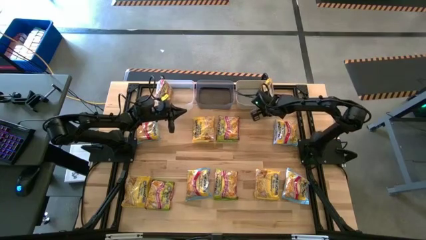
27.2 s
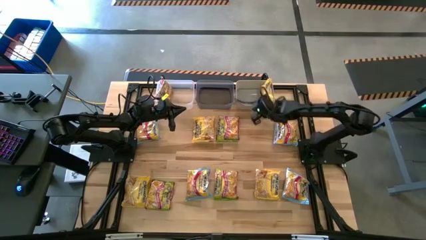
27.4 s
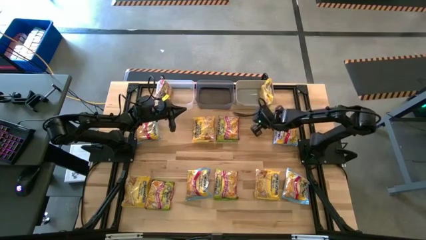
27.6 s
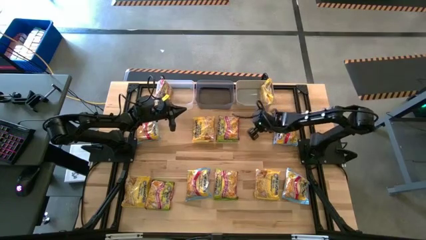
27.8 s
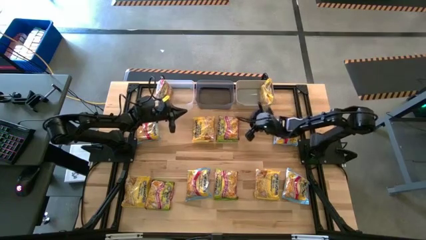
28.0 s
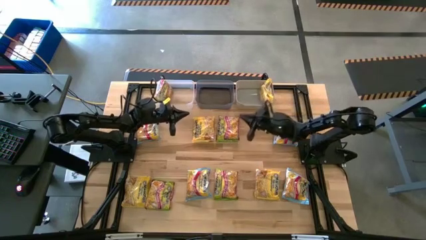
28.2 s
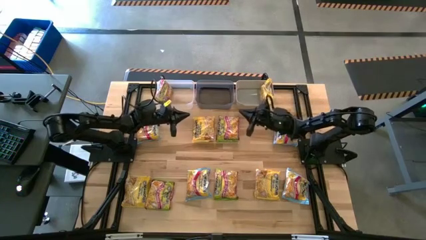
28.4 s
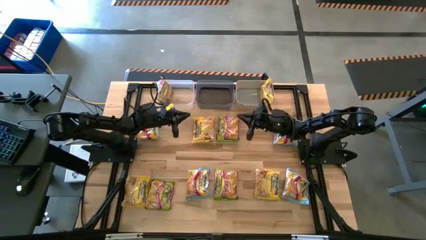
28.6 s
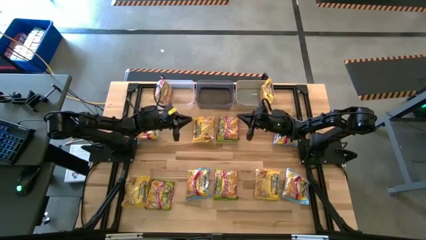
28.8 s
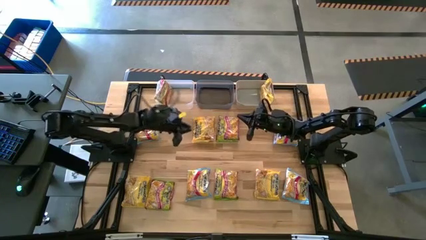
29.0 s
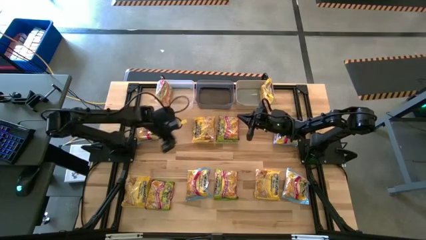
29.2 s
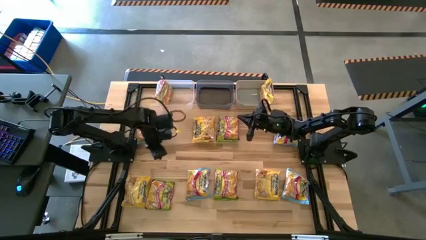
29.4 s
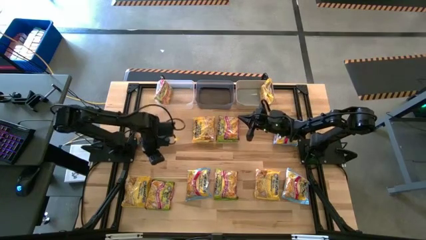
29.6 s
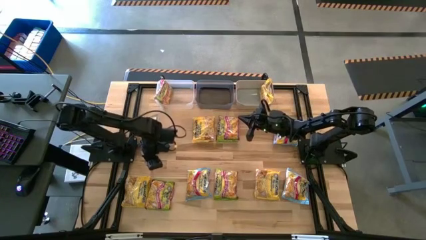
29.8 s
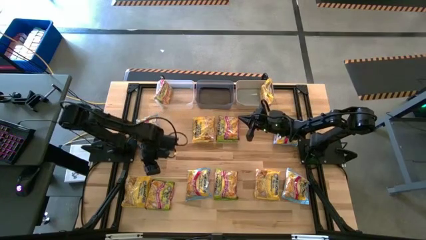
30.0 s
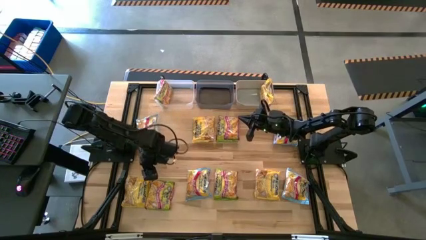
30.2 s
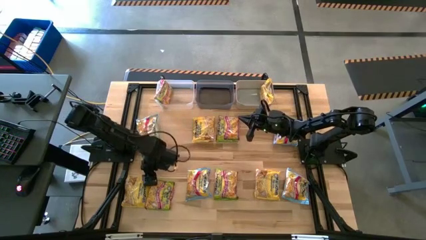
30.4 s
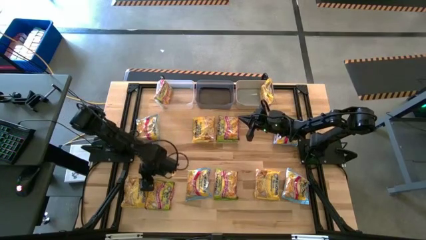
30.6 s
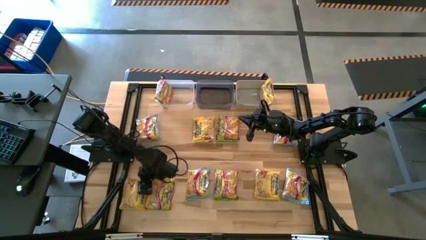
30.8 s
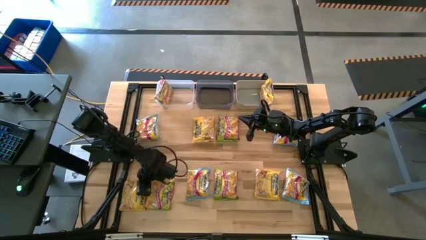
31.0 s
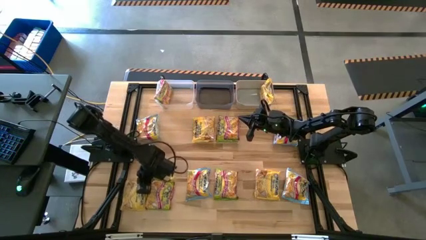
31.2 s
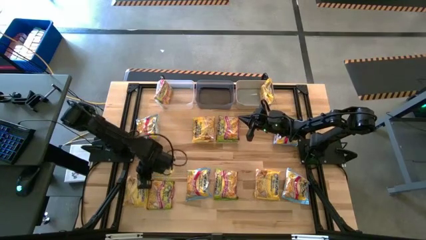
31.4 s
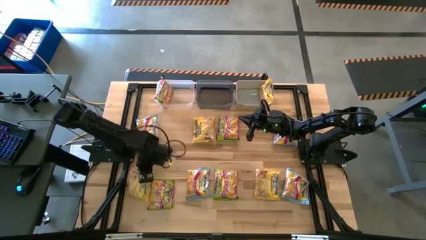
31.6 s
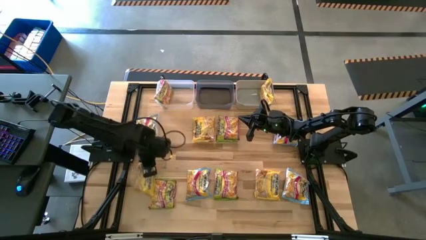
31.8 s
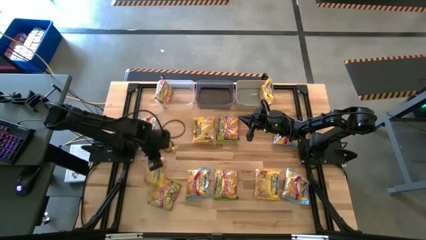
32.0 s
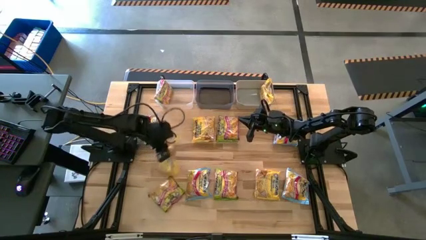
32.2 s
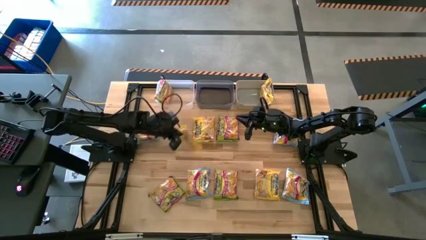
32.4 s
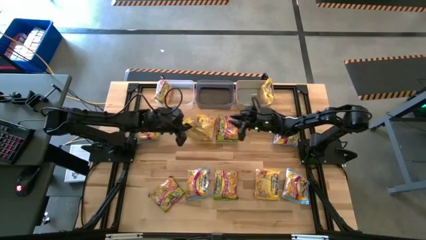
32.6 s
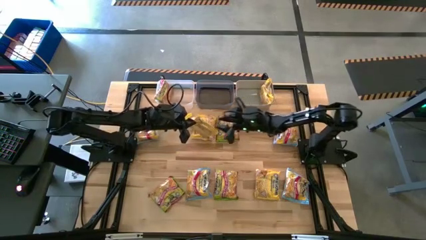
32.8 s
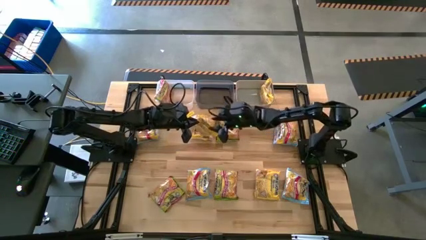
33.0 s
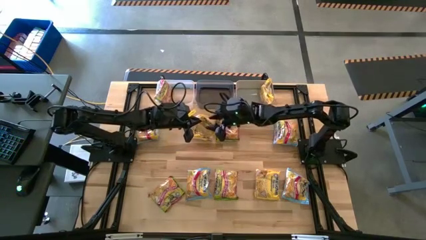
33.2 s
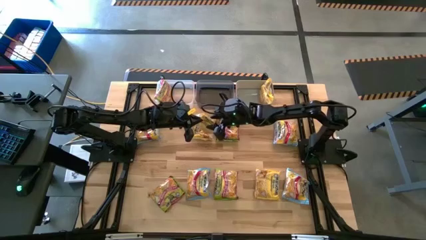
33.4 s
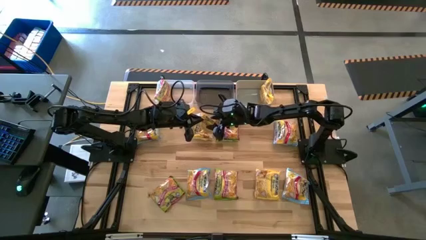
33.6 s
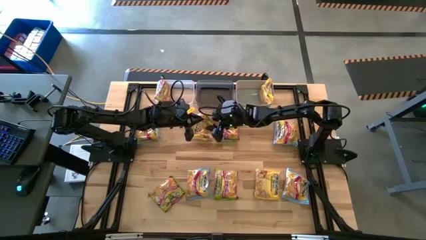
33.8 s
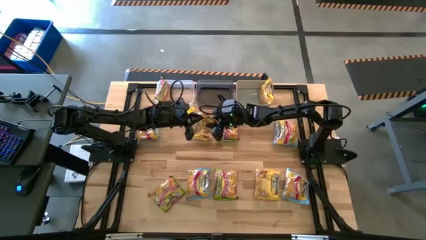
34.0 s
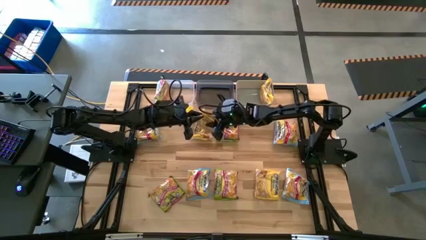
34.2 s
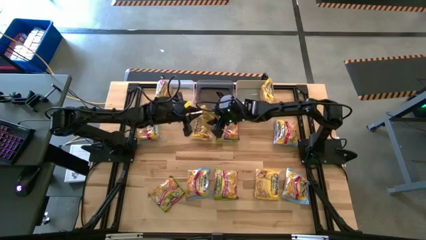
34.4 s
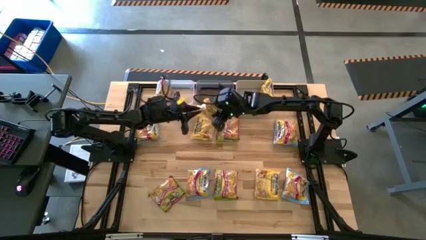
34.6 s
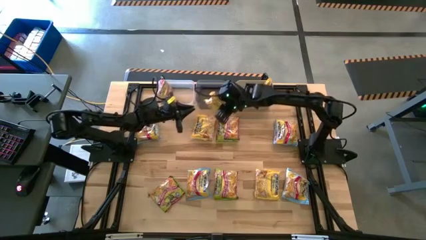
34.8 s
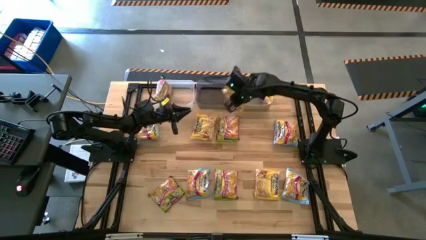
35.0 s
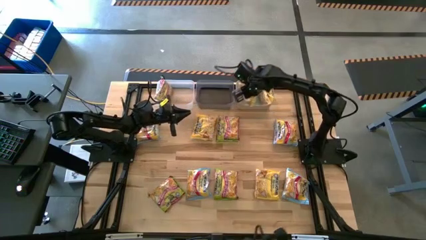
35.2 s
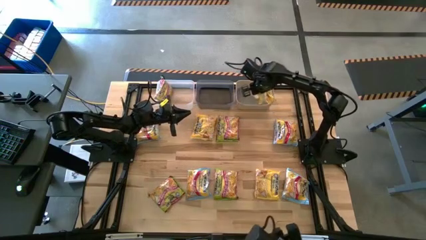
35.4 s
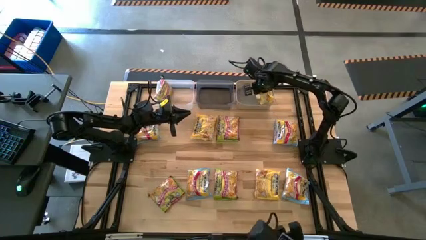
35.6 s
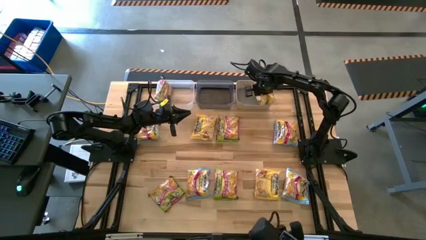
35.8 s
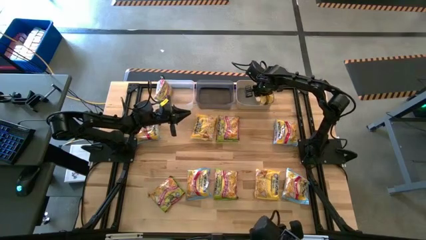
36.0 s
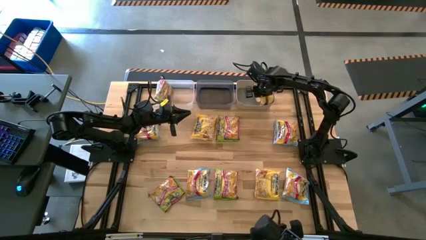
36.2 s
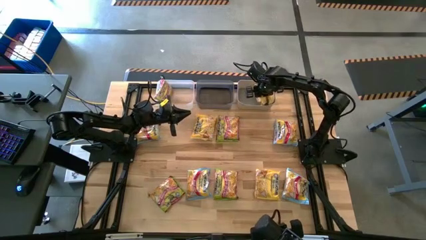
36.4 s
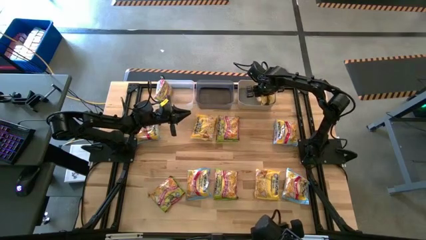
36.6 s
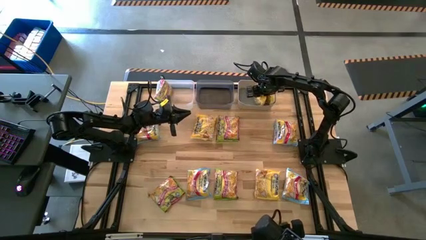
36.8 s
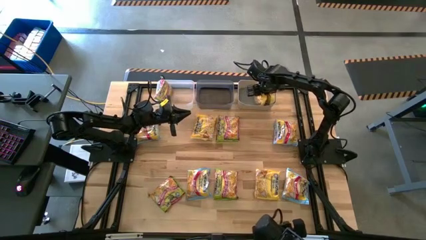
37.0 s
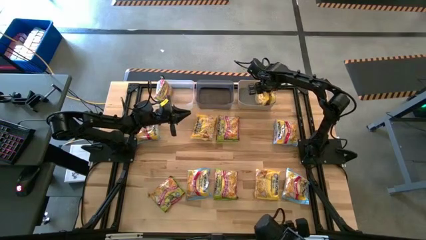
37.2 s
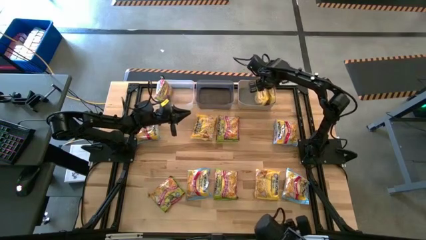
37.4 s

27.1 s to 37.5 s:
Task: Sort Maruchan noodles
Put the bottom left yellow noodle pack into the gray bin

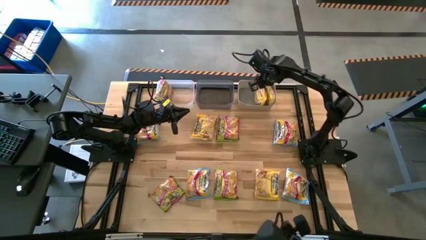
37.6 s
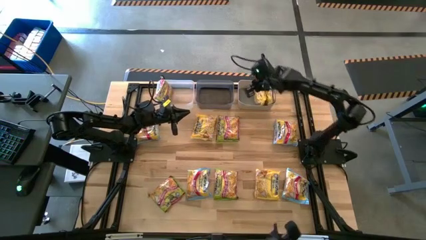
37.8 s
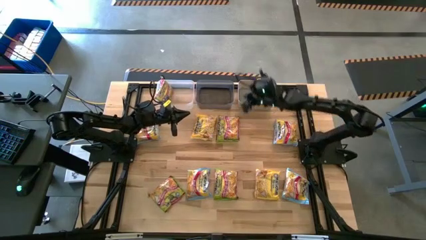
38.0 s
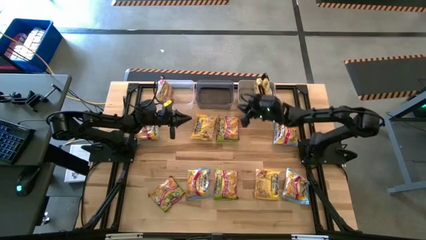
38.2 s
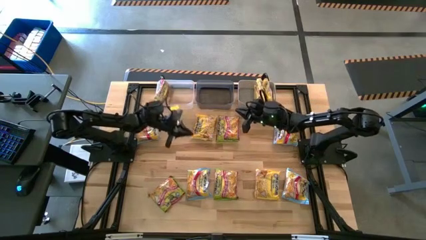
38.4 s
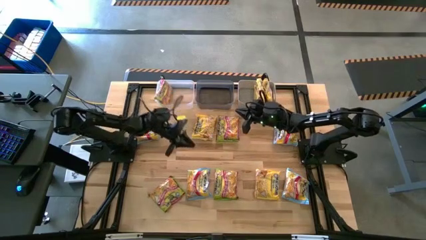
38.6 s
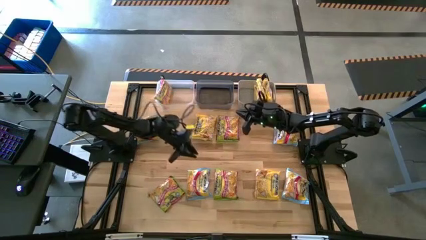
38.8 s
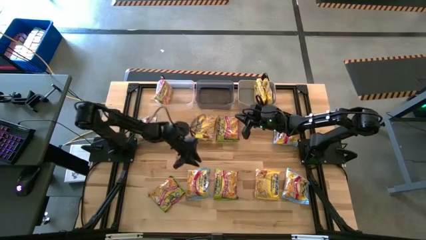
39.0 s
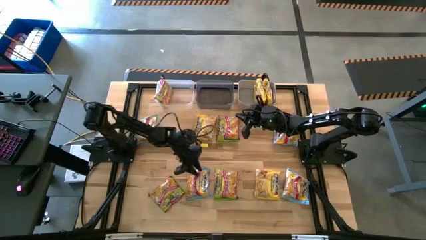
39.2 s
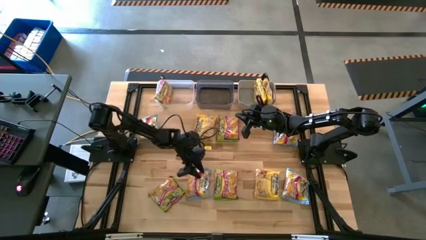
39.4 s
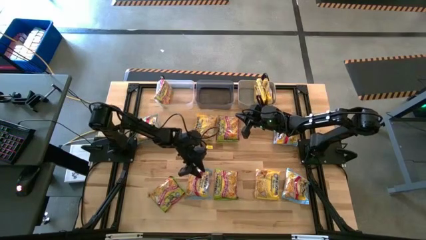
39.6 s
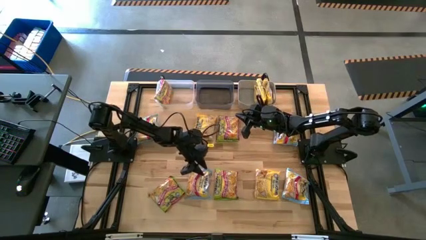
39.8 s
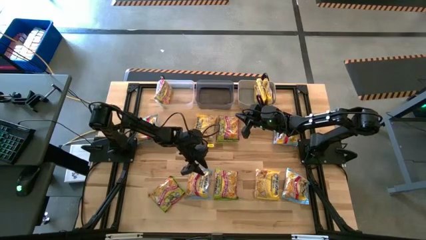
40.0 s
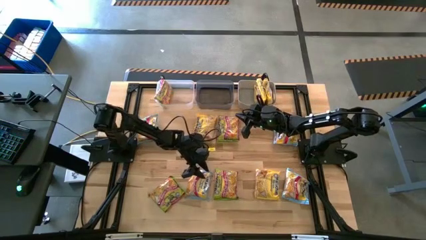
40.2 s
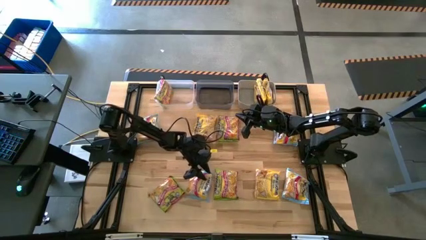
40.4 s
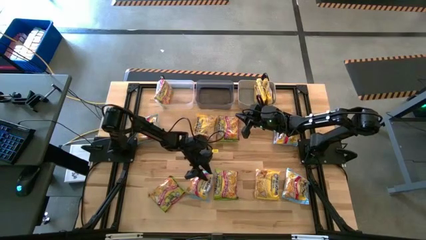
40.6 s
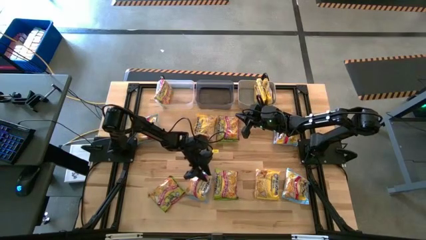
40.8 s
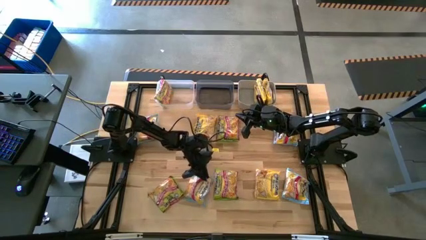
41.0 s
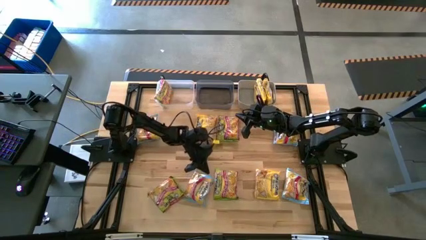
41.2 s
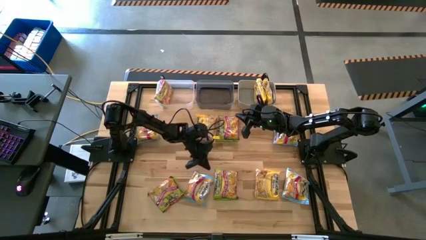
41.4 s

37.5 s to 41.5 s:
Put the bottom left blue noodle pack into the black bin
